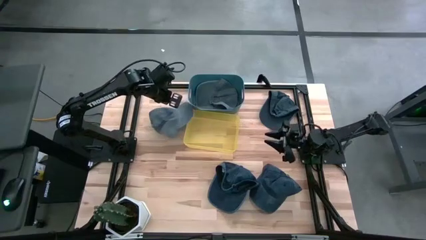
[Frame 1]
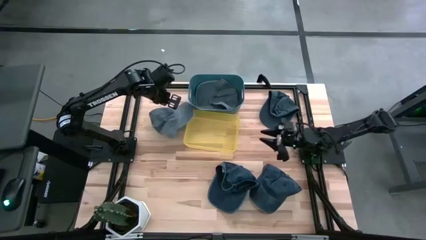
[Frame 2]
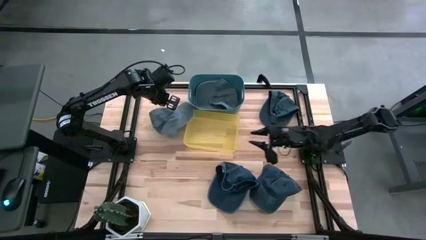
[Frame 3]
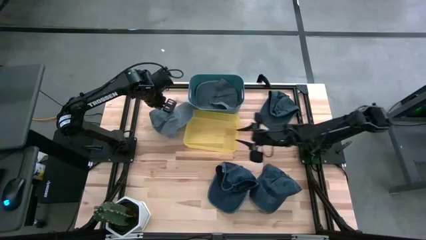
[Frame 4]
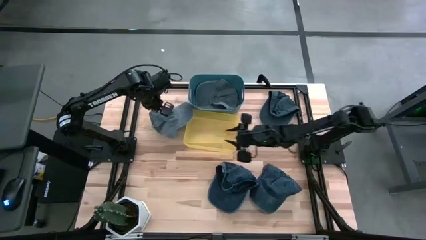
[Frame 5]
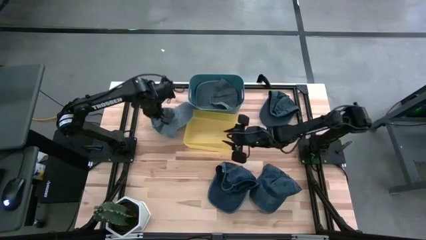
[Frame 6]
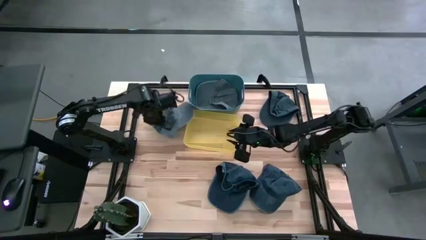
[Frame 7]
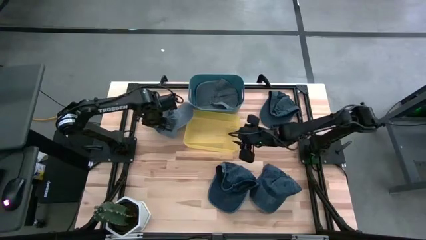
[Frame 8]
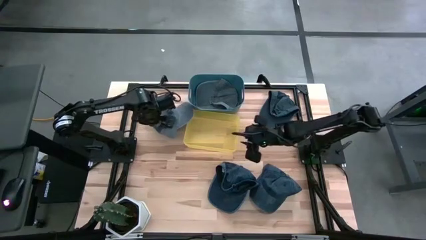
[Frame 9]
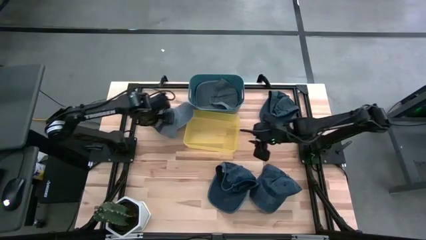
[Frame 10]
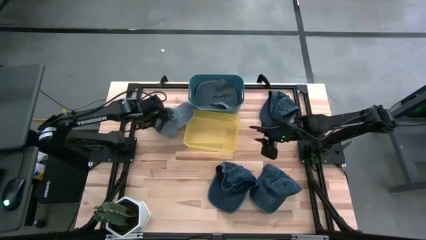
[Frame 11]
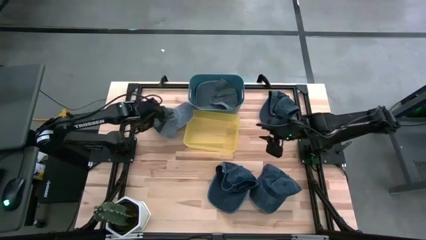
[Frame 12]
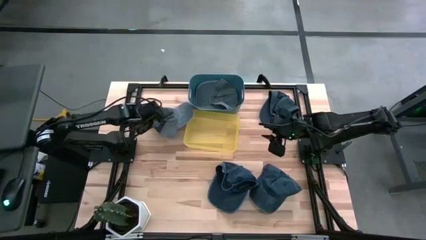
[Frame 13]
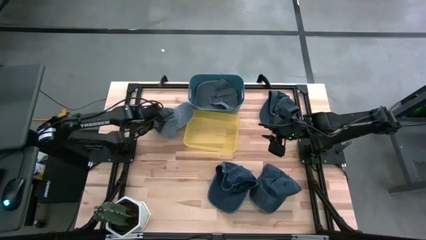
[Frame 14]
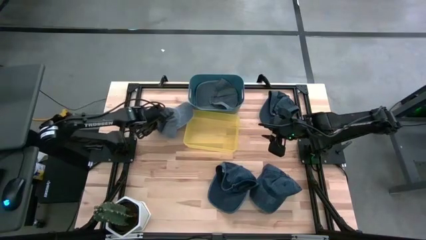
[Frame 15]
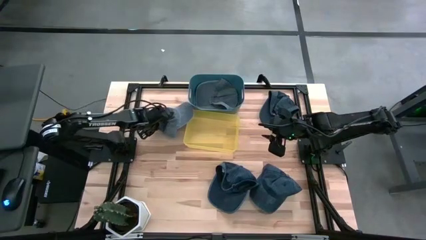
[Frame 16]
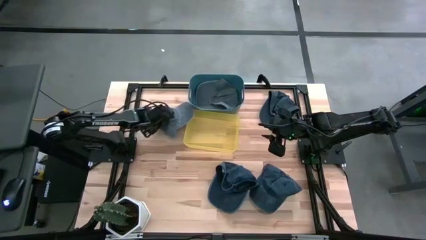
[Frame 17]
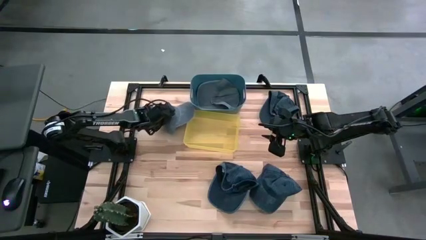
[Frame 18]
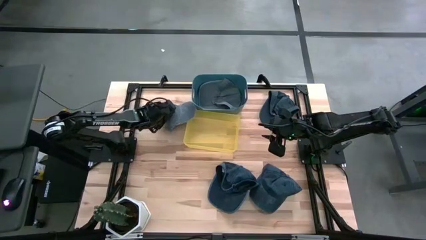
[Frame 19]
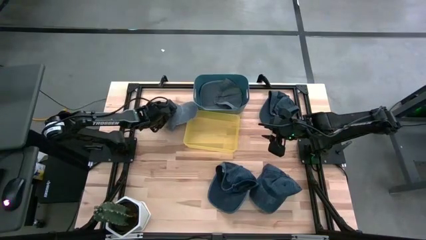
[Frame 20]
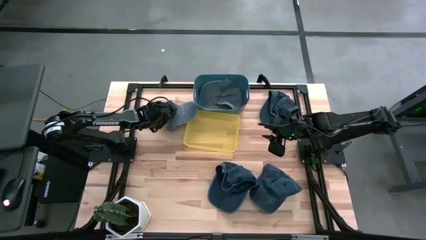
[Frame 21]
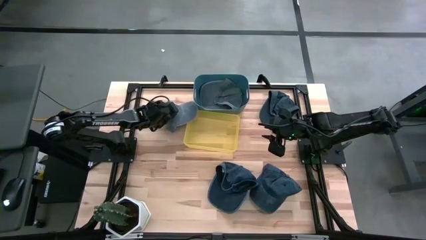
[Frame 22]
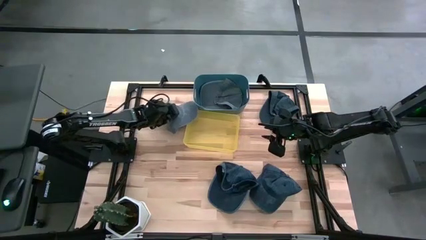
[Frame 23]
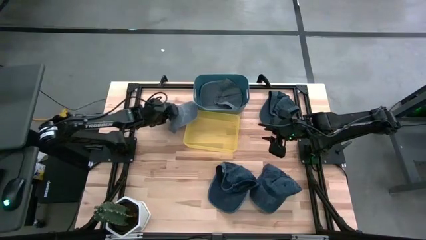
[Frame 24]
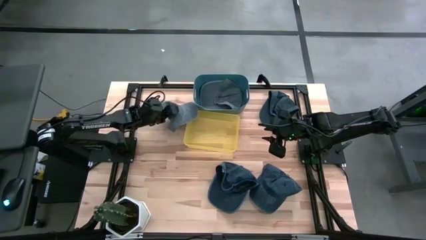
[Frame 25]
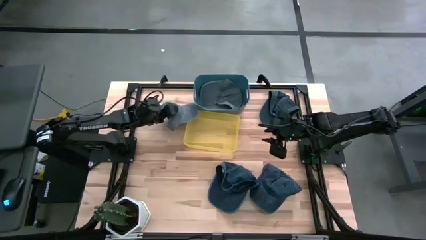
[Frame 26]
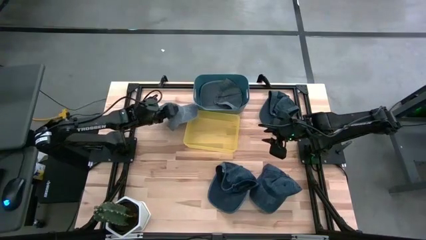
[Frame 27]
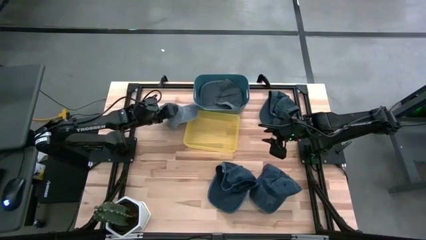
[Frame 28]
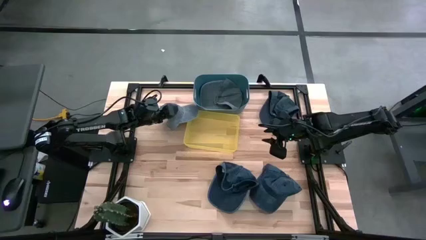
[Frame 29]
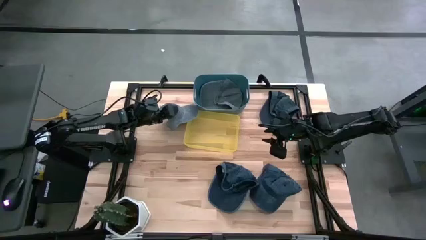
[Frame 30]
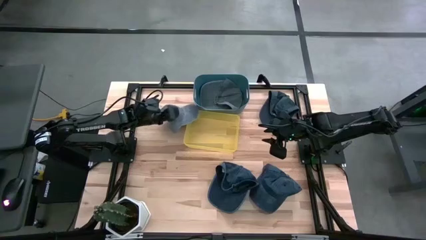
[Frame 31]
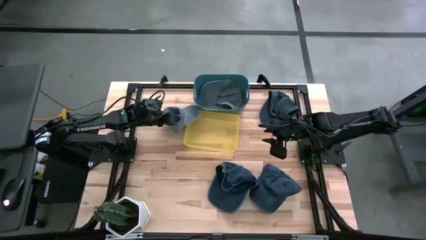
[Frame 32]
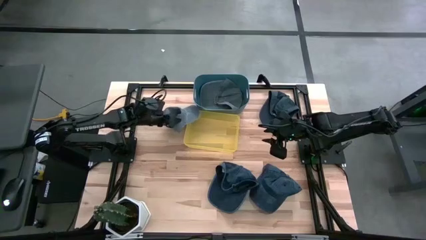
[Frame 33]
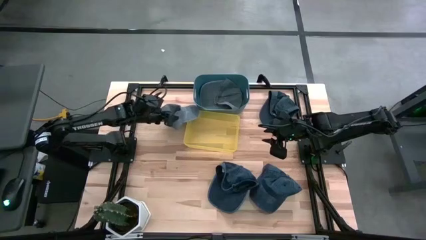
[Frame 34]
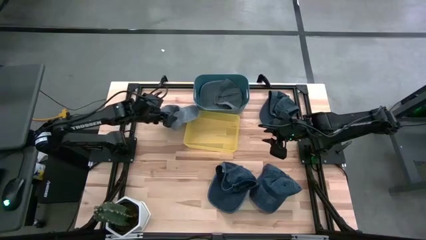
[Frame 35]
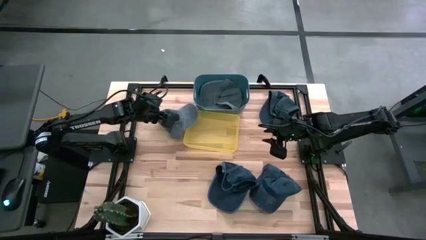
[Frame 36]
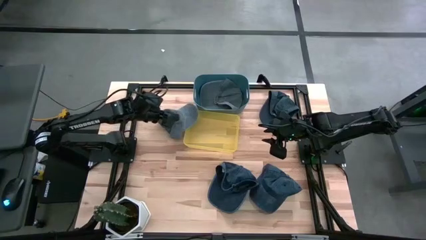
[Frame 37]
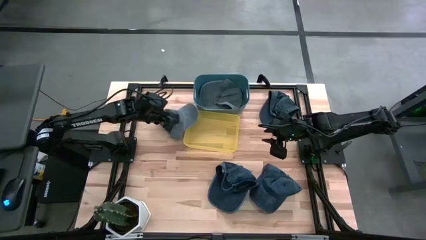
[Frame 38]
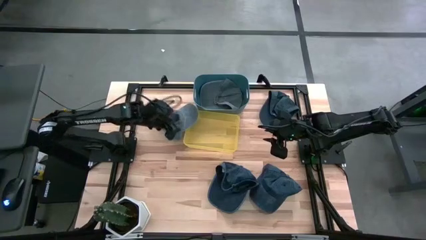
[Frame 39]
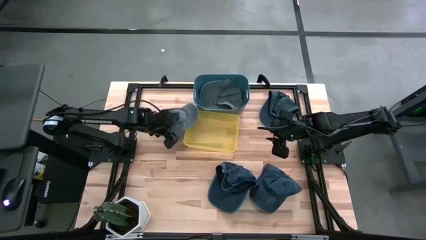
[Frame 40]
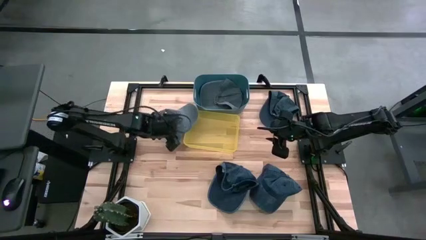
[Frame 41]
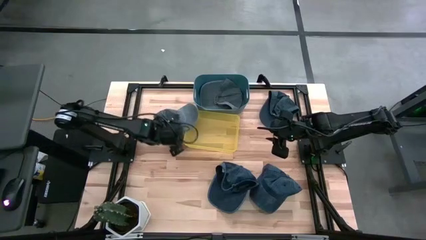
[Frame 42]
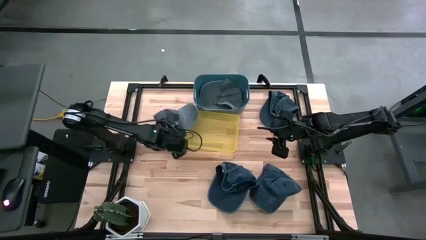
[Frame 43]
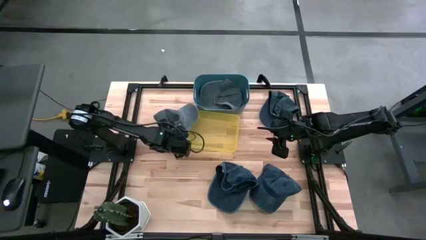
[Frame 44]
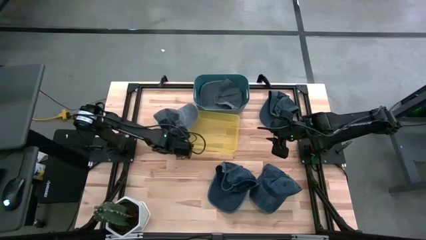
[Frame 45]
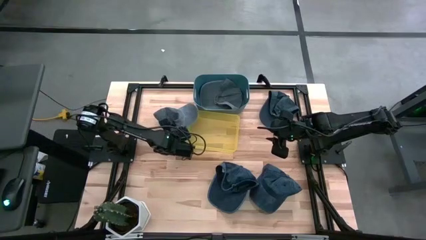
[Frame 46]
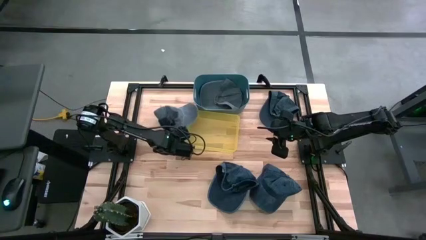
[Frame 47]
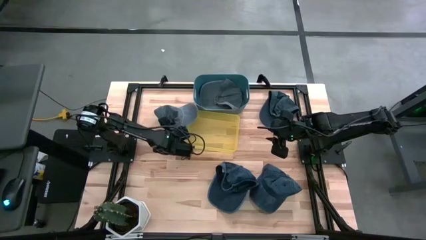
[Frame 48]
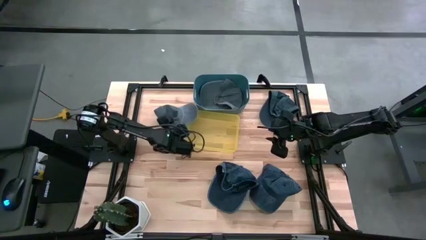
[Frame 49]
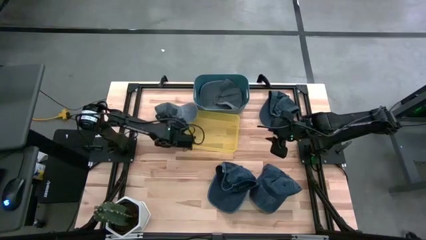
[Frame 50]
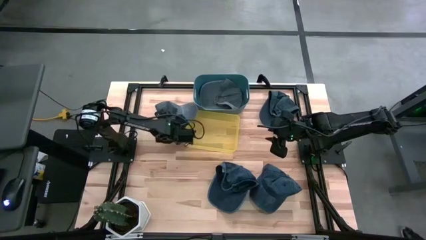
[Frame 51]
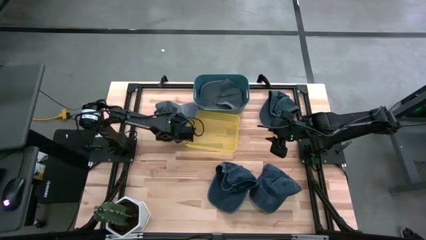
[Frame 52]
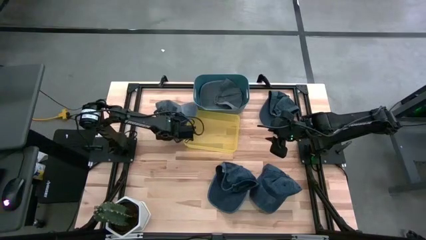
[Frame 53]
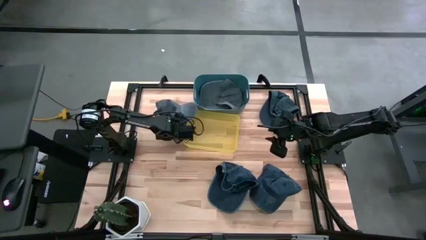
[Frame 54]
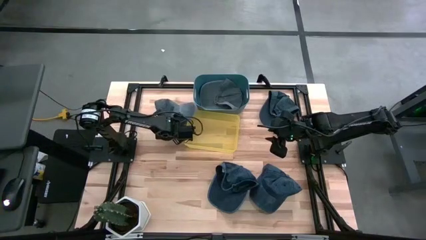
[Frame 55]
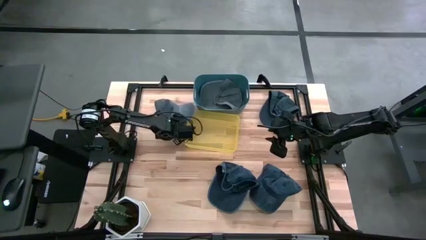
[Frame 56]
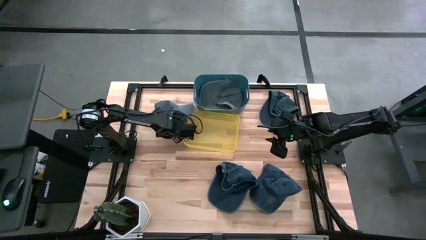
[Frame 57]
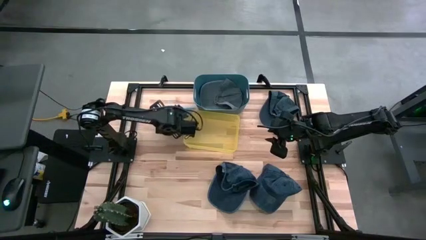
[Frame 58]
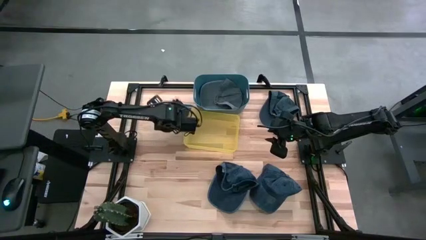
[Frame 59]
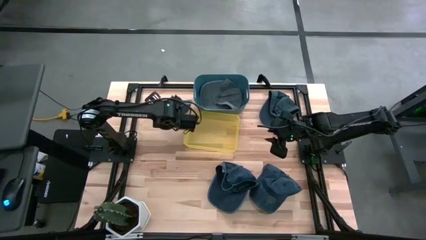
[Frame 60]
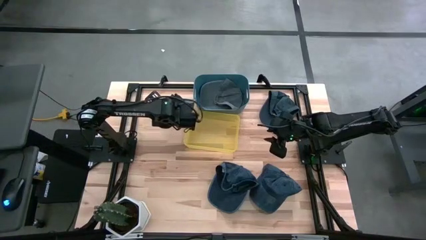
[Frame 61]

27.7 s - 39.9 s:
Task: Pick & Place hat
Put the gray cap into the blue bin
